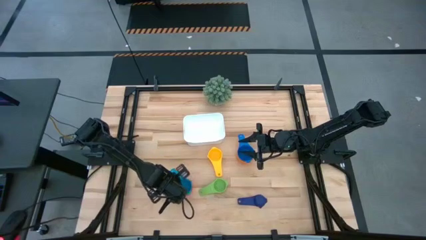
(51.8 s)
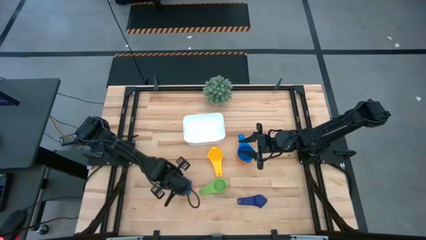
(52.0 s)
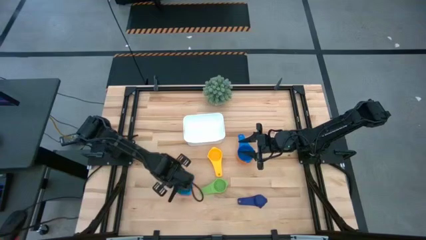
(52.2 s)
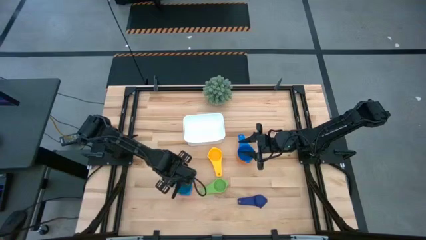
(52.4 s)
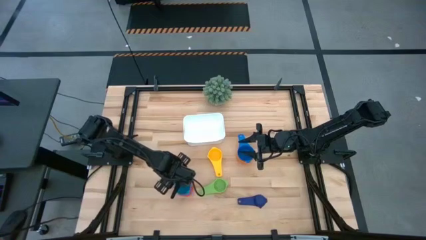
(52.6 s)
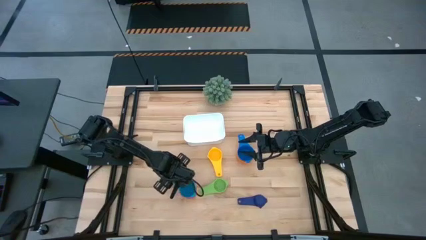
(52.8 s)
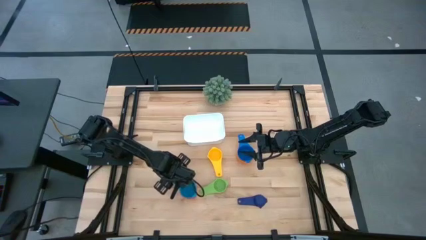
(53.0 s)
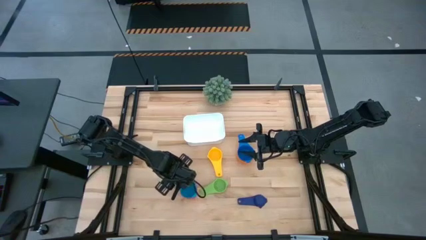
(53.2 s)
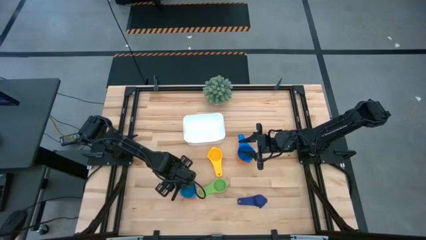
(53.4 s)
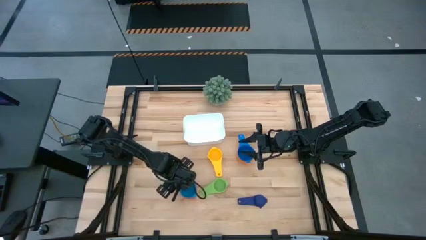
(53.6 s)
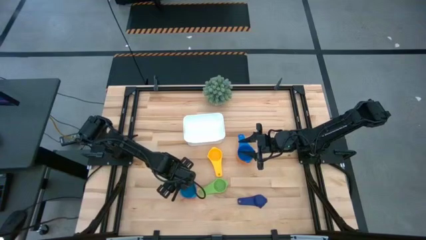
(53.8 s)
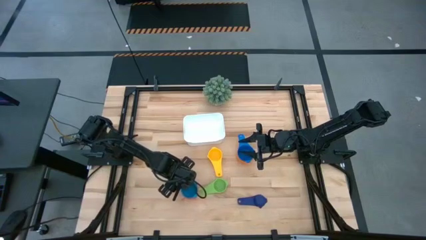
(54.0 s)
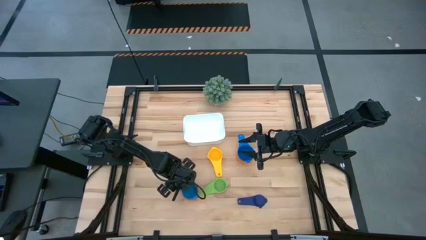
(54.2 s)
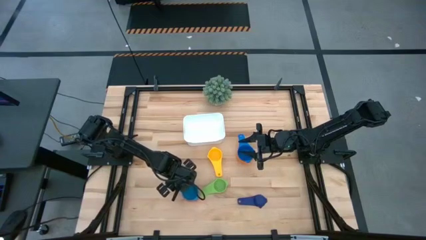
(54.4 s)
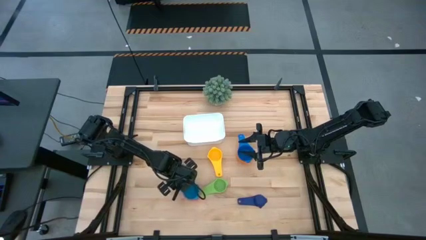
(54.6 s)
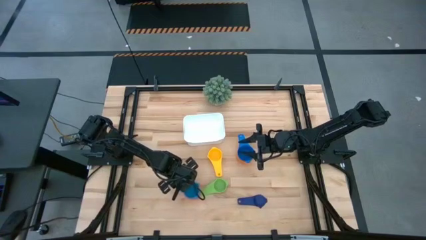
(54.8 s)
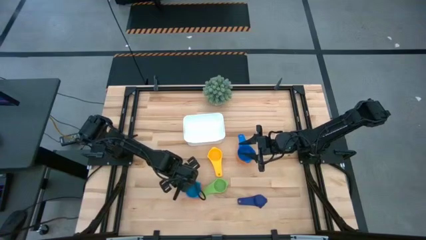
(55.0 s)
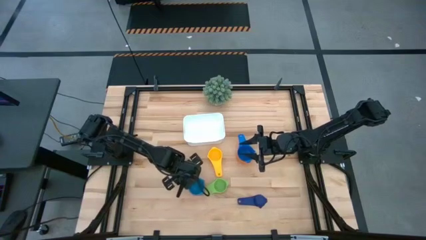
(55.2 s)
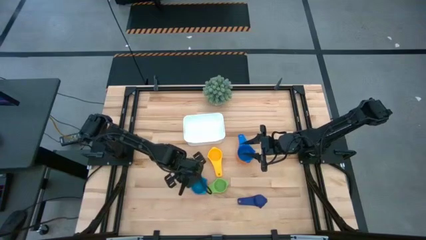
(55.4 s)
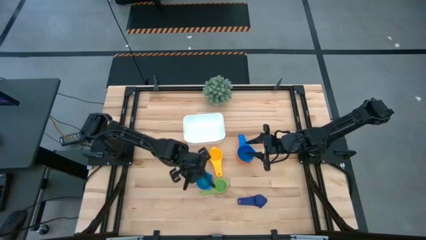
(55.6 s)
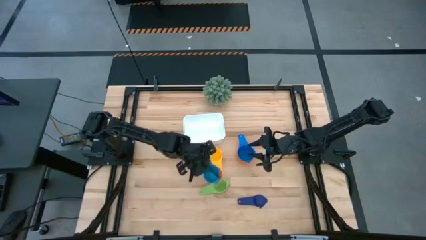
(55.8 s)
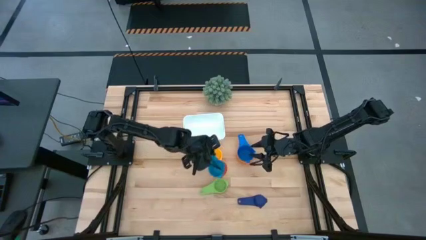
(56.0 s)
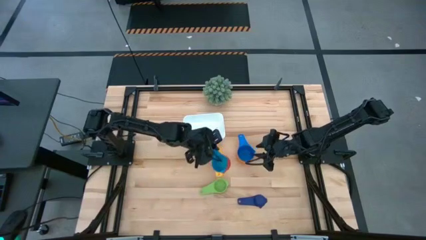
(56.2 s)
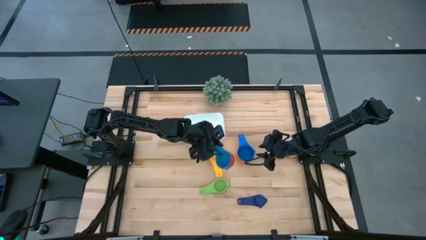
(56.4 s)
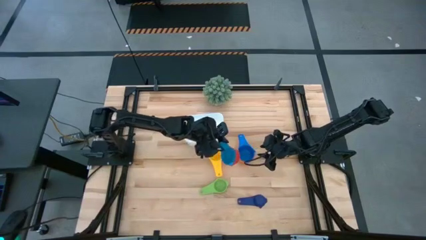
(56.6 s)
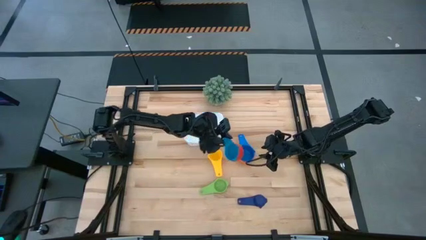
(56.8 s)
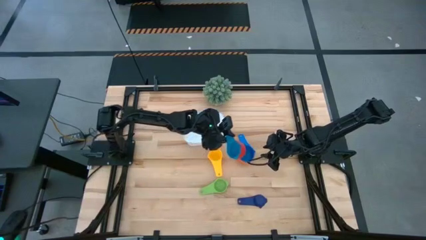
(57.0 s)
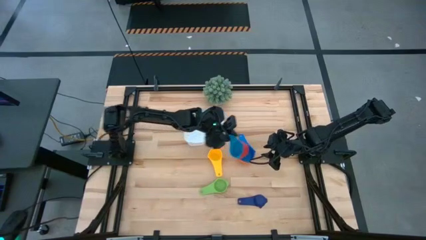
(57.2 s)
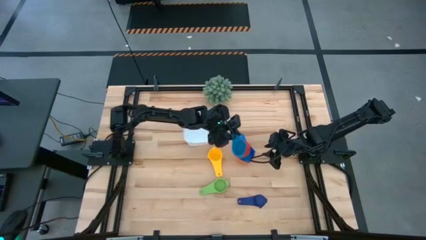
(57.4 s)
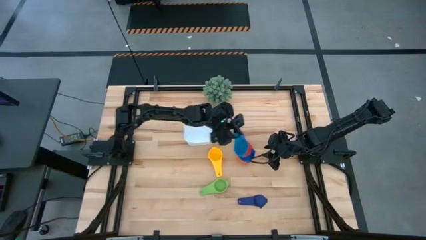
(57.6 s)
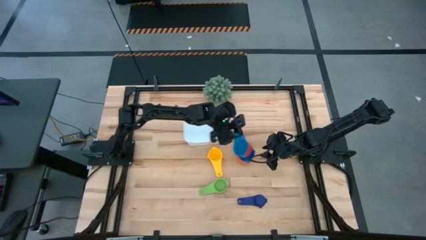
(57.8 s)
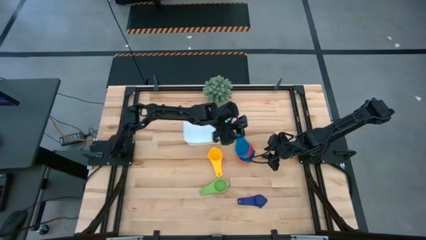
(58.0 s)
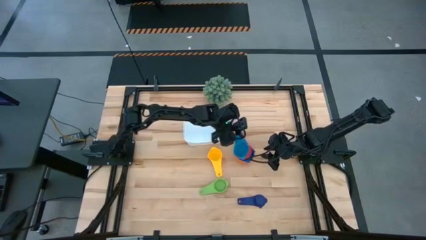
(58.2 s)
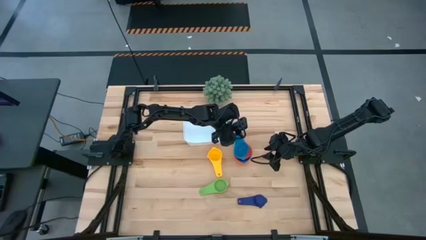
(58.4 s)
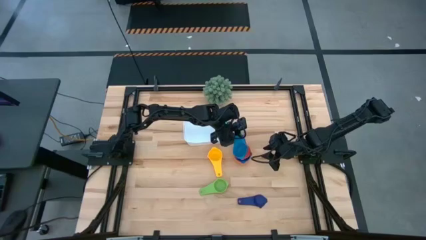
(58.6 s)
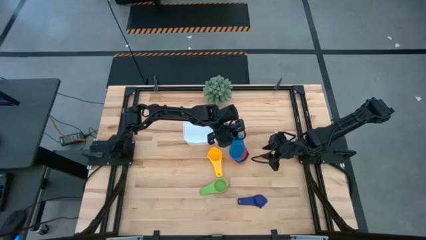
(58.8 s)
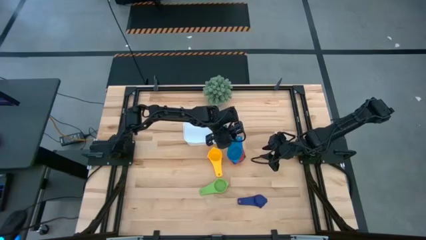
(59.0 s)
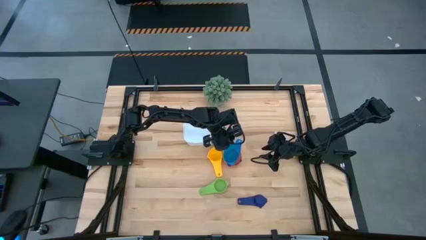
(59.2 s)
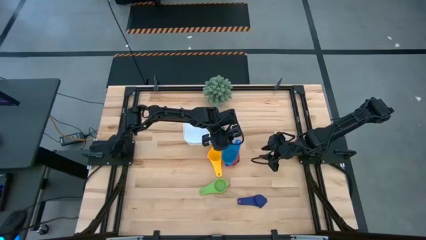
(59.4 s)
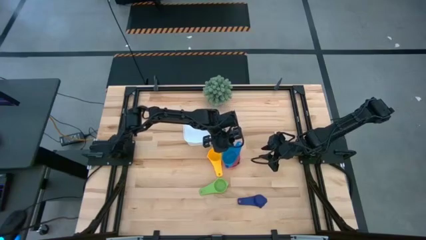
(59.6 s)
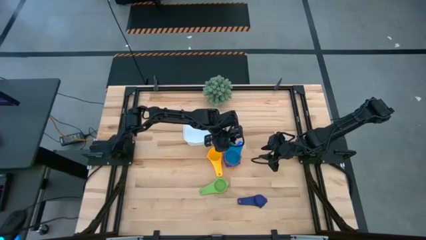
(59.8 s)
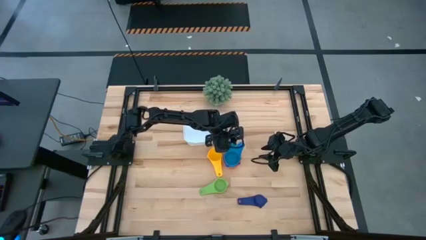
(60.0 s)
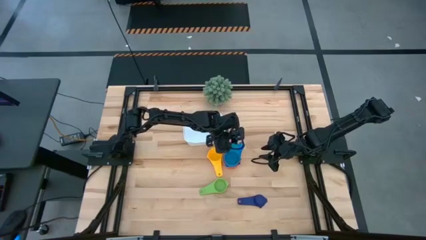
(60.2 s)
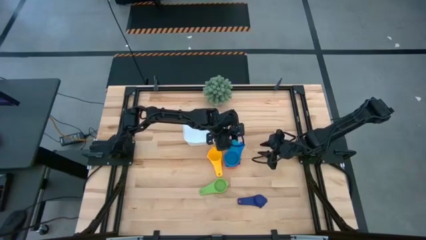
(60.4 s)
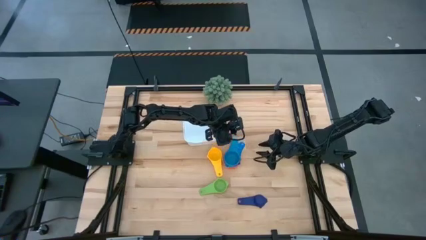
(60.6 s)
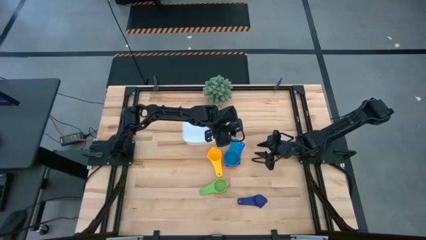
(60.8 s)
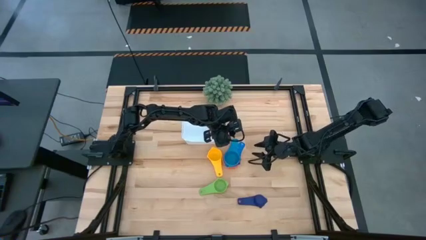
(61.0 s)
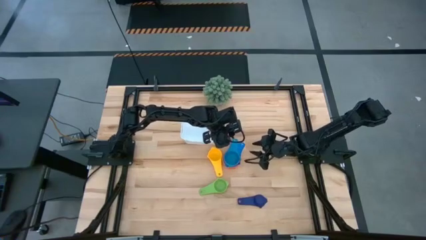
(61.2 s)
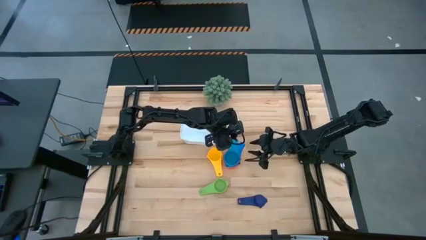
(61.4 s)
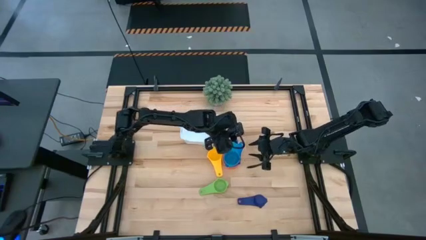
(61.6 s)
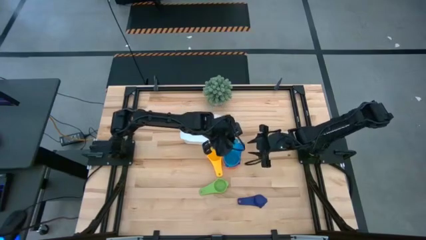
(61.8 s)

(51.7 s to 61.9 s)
Task: Nest measuring cups in basket
Stack the left stacked nesting cups on the right stacked nesting cup

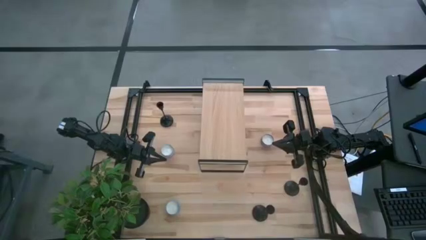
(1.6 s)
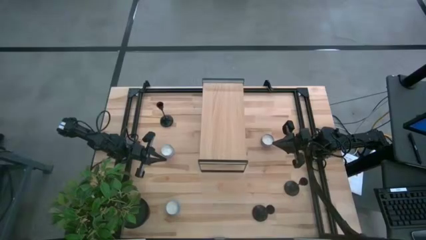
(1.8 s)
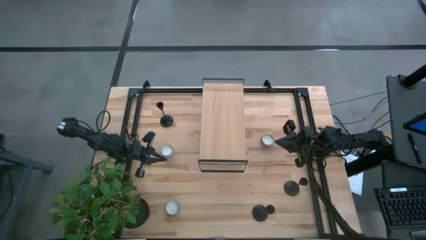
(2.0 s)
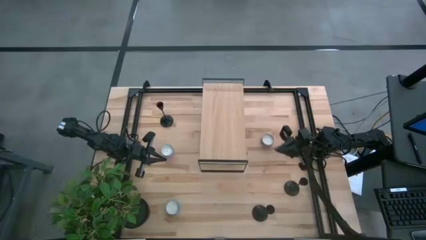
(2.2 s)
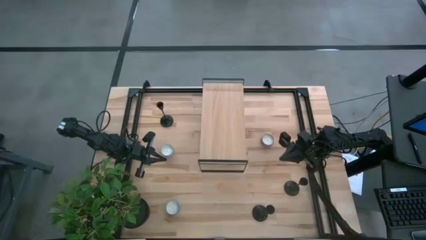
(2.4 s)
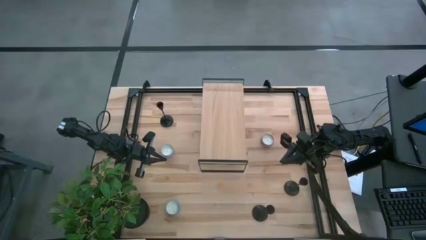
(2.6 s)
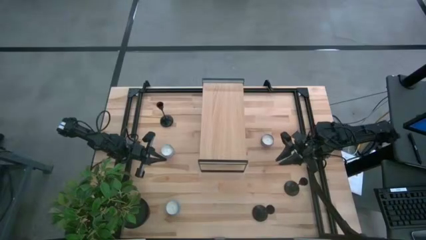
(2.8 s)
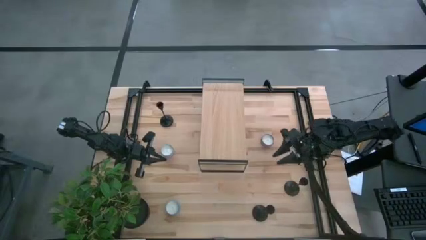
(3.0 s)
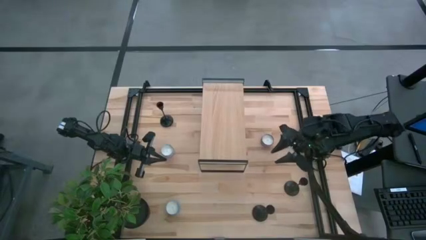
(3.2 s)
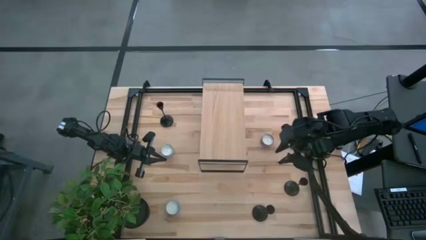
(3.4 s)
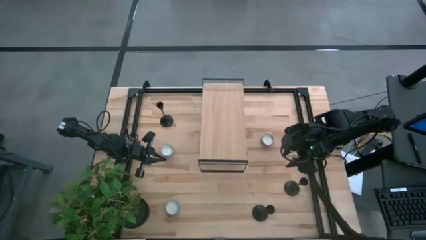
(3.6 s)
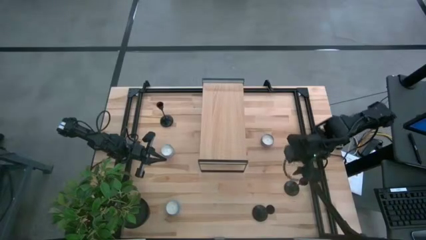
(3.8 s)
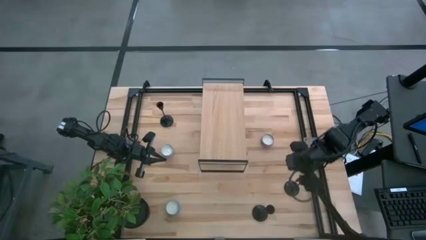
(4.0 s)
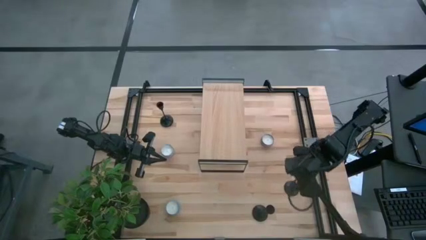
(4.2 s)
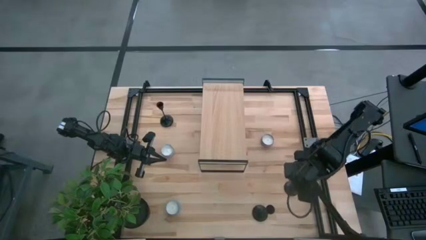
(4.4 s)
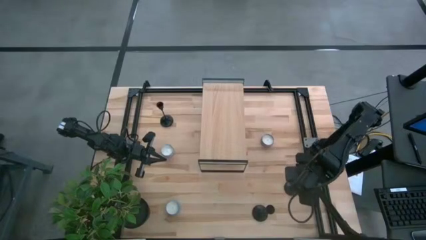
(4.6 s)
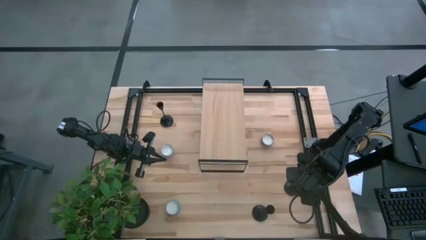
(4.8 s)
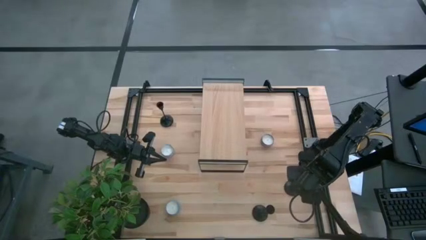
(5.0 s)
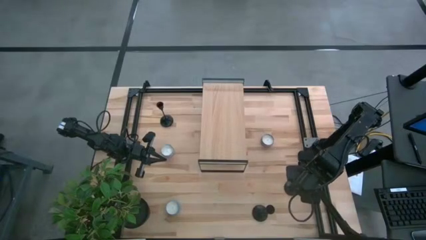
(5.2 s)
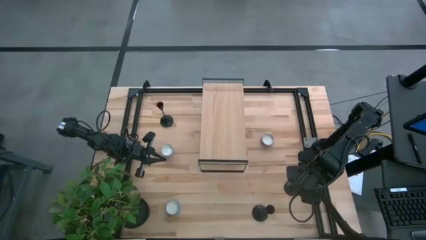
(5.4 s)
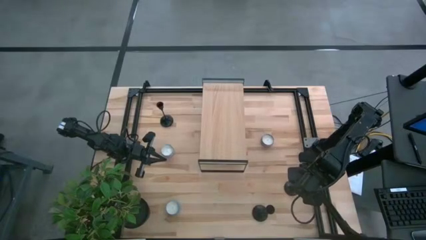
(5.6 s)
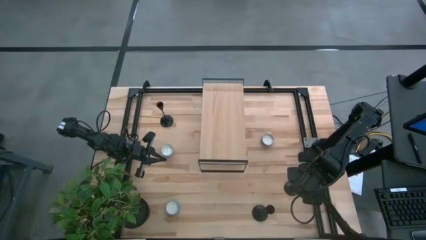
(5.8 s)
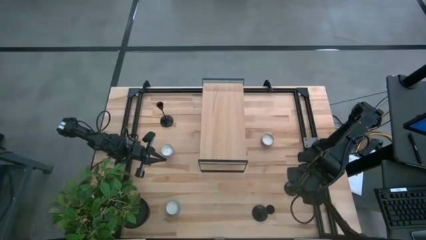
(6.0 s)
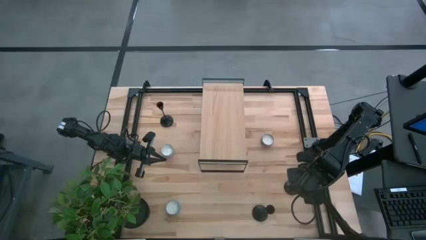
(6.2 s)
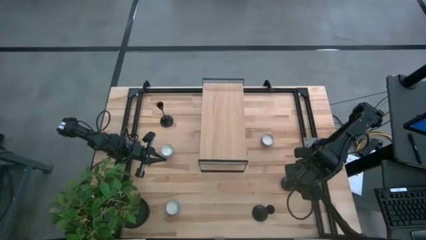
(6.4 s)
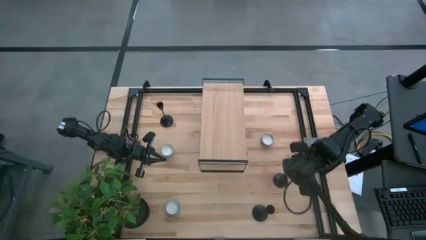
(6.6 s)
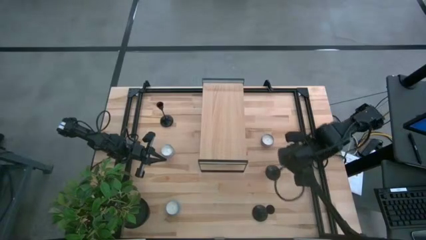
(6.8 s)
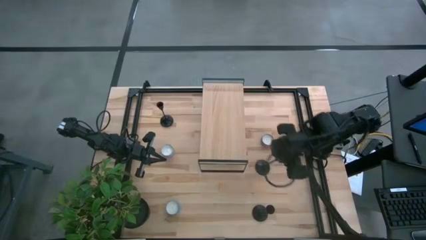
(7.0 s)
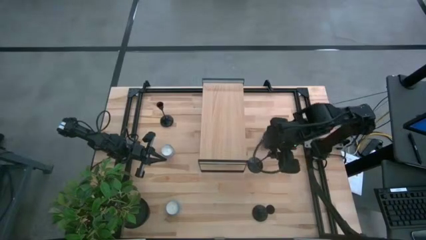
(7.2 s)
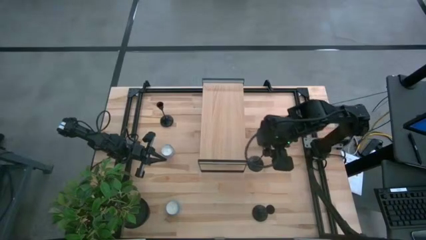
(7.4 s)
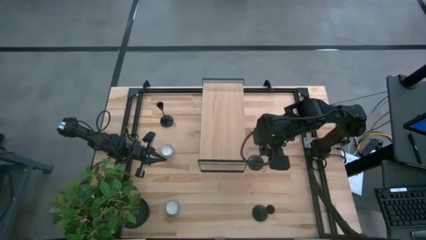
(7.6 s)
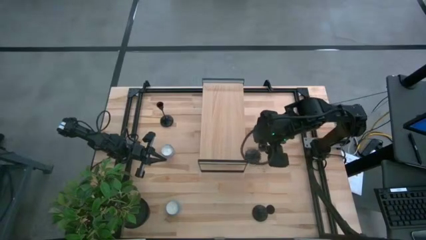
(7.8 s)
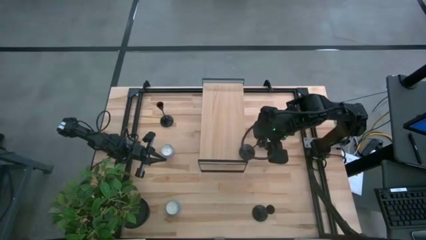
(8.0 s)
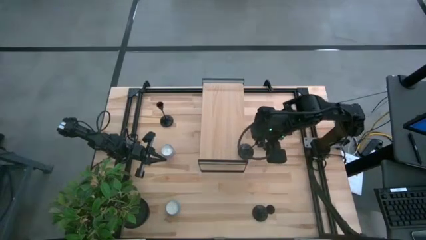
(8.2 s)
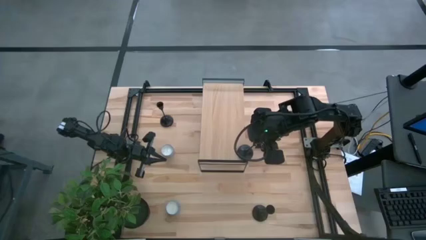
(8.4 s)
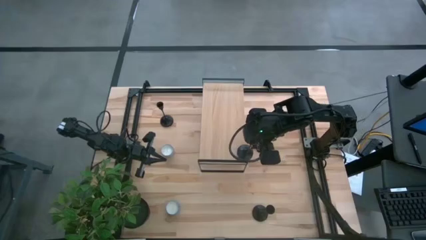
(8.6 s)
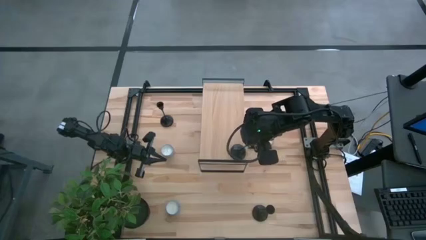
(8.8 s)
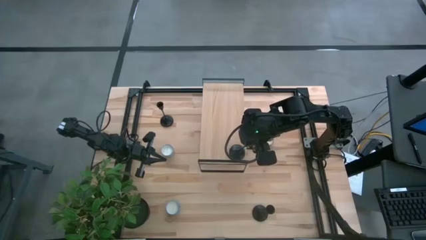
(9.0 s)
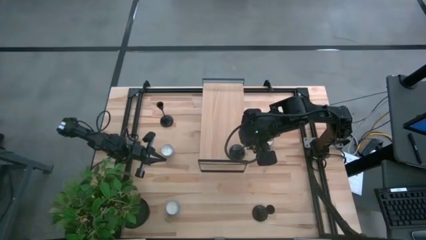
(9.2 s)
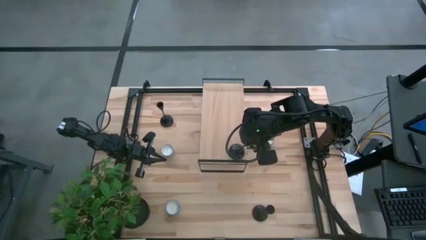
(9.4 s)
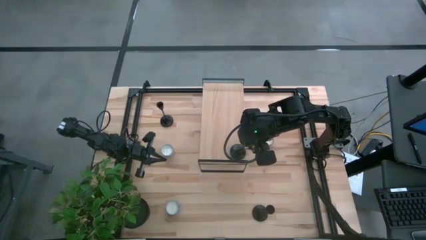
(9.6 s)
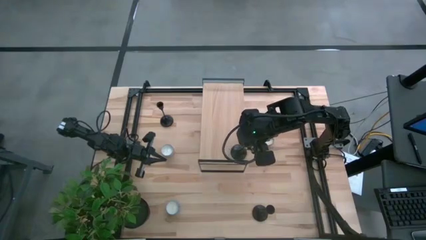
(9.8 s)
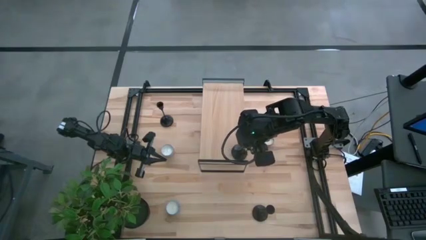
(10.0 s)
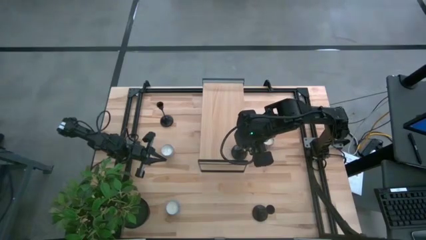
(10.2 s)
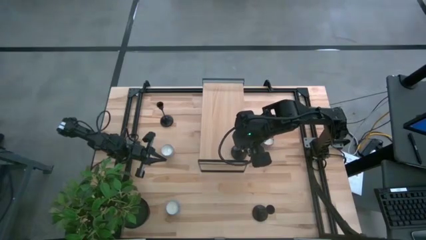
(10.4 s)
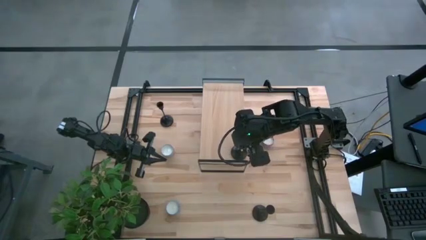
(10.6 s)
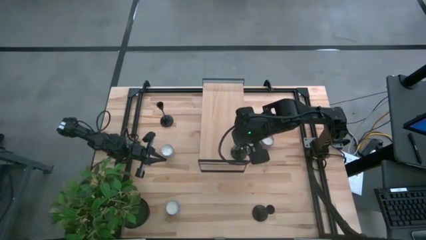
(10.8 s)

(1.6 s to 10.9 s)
Task: Pick & Place candle stick holders
Put the middle black candle holder on the shelf
